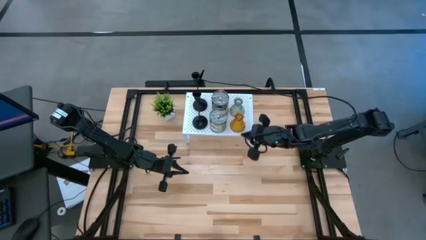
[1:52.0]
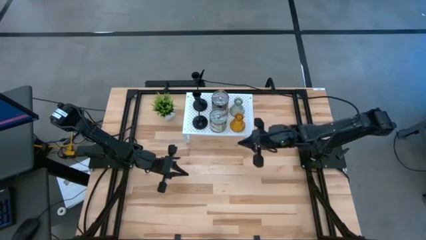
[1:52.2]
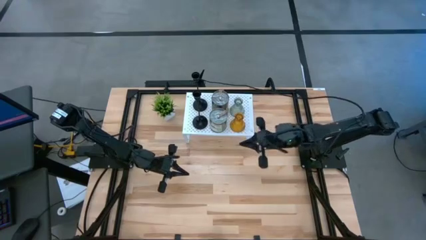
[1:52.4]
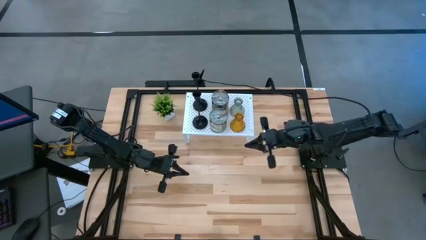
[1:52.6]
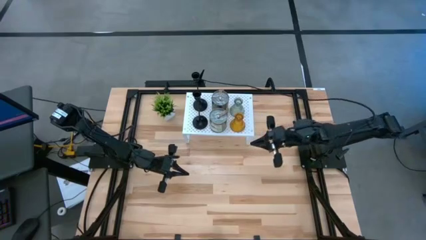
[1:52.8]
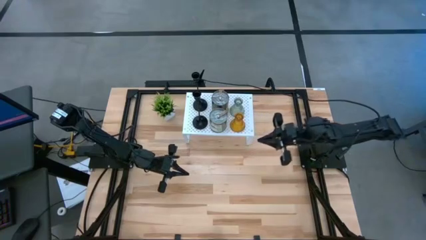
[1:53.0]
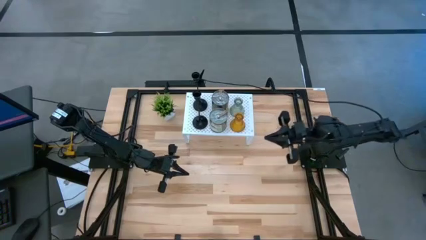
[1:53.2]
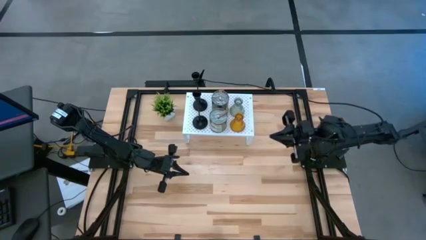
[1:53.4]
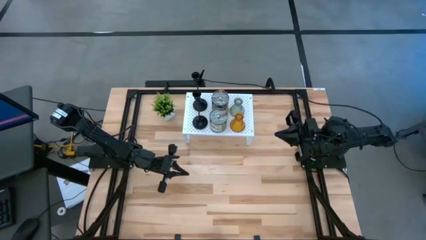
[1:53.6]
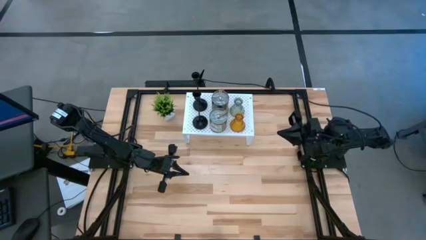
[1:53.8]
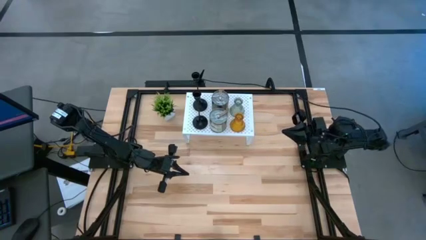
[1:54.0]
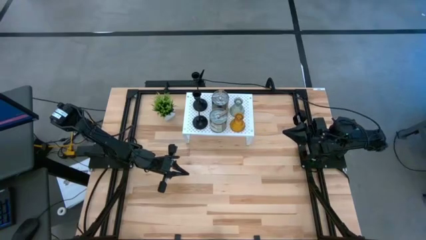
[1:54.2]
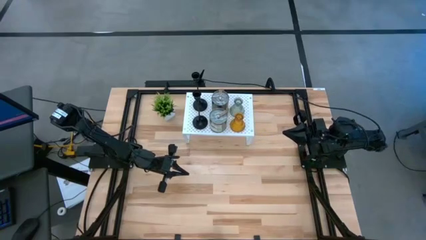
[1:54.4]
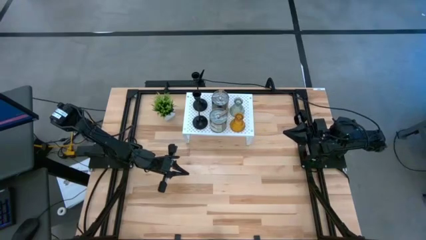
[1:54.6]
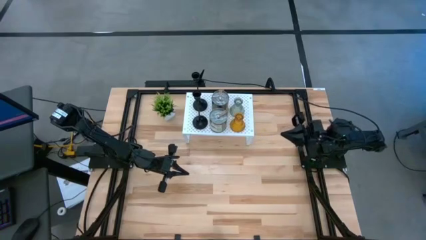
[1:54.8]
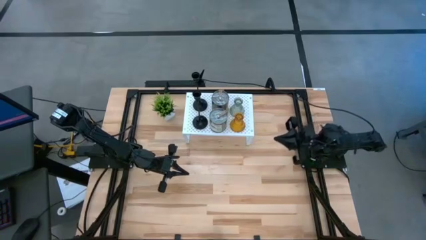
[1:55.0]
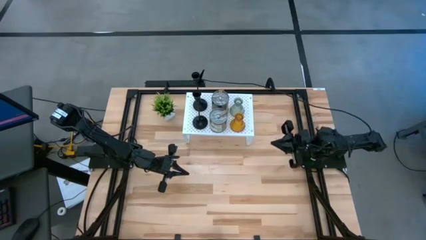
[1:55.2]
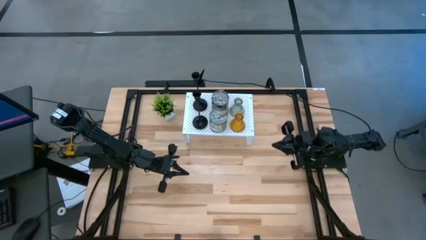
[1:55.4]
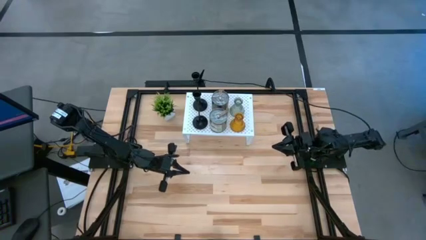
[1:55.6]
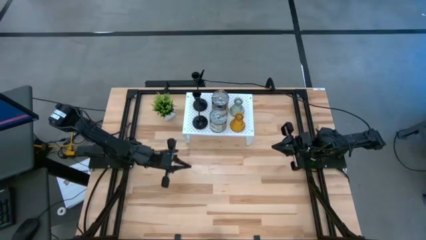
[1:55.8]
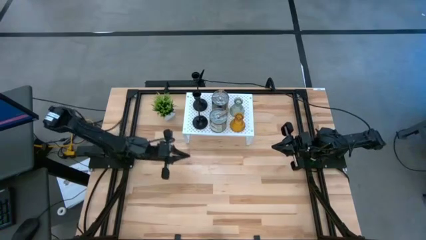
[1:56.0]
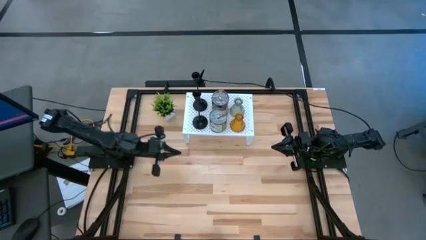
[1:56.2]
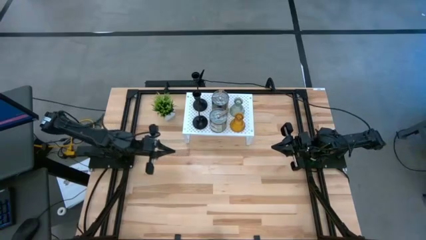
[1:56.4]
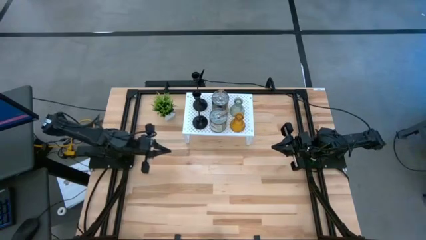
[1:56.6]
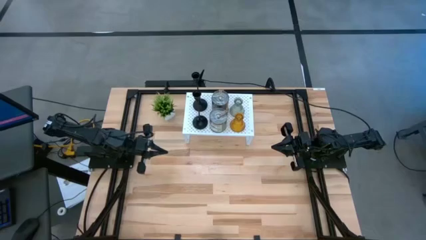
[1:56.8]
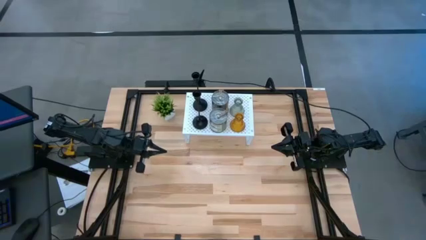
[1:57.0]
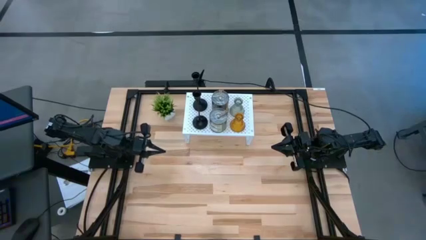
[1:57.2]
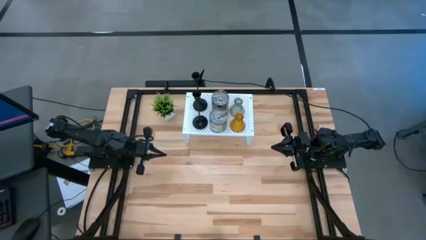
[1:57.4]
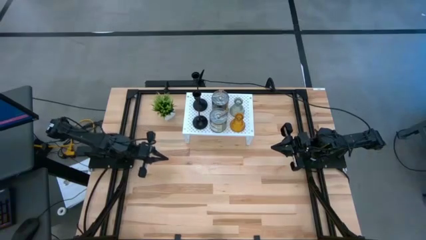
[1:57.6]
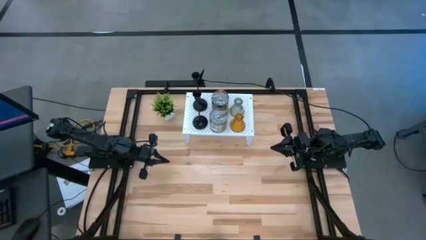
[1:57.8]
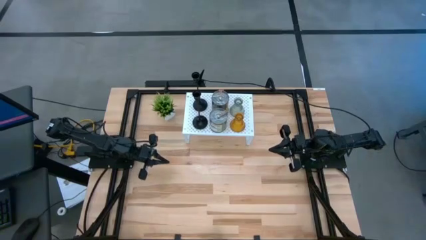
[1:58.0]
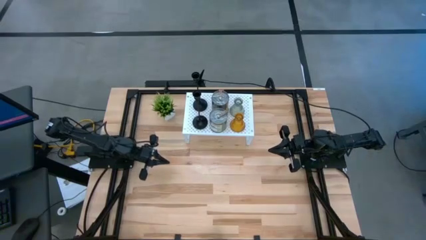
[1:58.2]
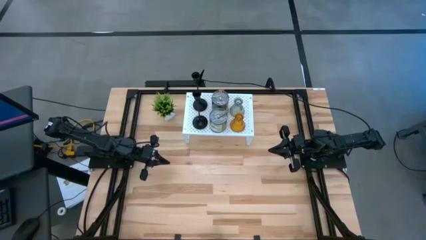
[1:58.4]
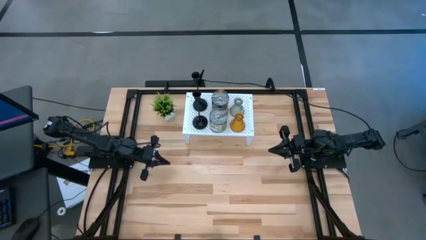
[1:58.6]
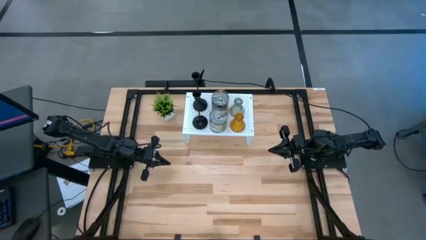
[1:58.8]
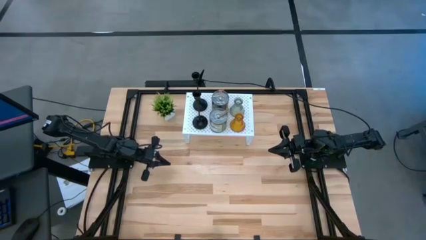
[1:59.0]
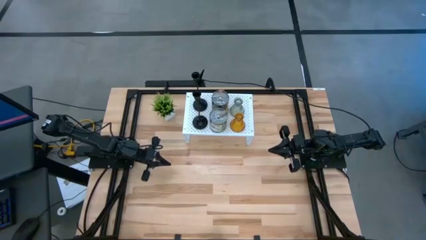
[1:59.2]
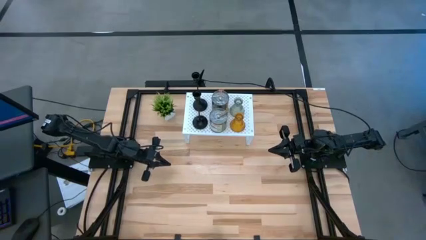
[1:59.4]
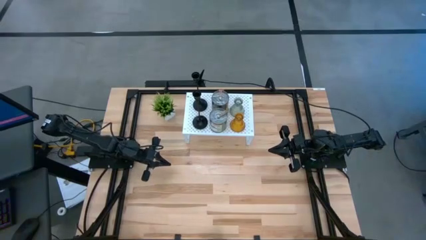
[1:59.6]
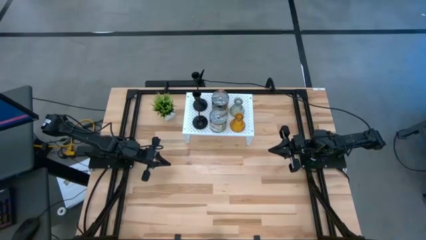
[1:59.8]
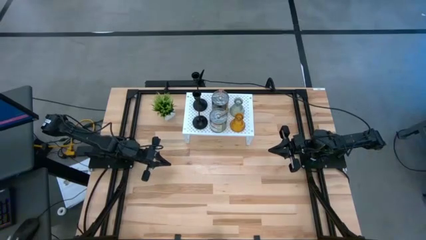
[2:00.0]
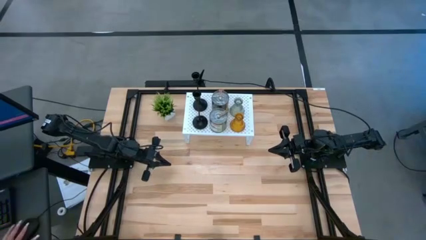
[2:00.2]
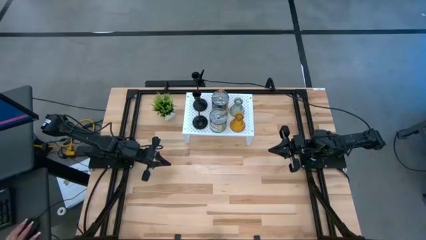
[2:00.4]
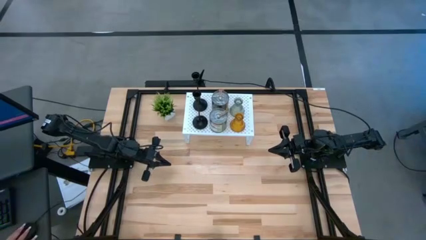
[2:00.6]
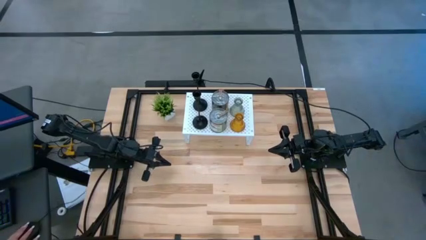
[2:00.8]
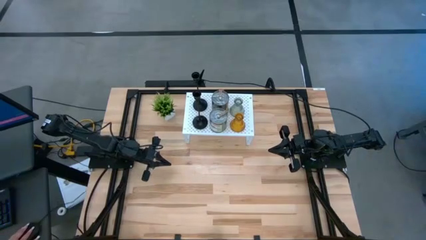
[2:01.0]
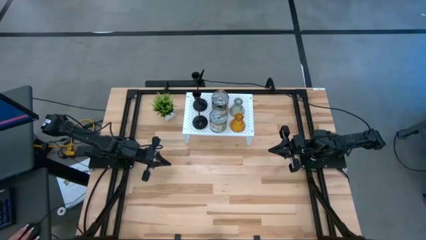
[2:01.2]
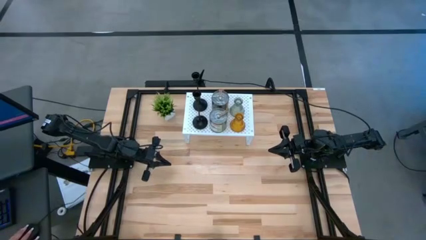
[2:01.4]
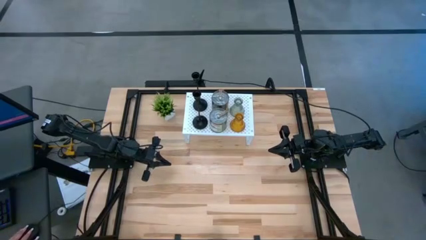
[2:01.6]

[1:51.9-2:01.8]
Task: Pick & Place candle stick holders
Return to Home Position

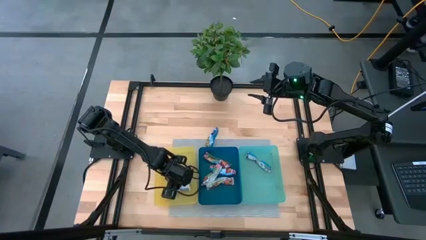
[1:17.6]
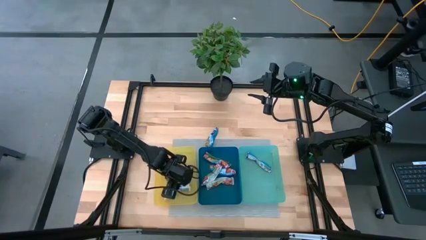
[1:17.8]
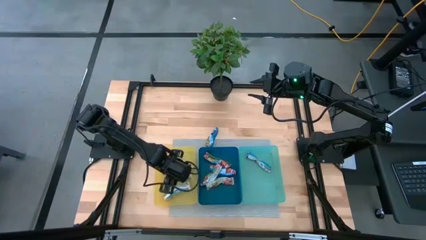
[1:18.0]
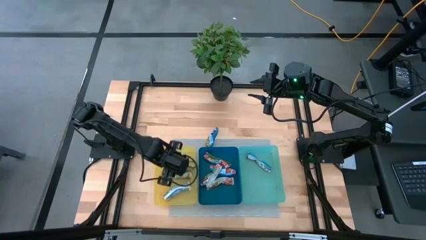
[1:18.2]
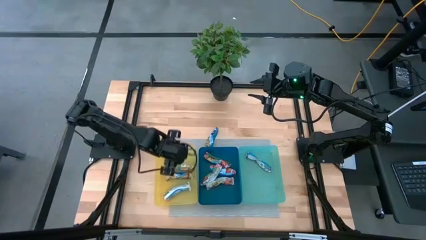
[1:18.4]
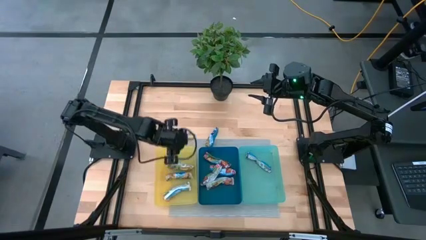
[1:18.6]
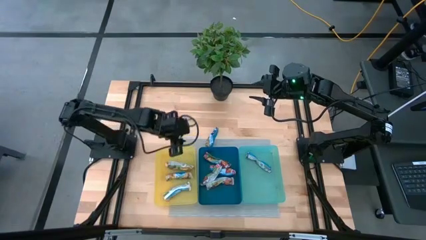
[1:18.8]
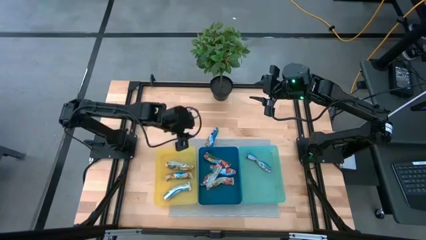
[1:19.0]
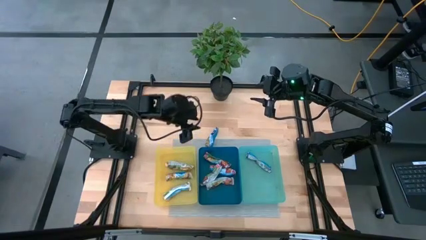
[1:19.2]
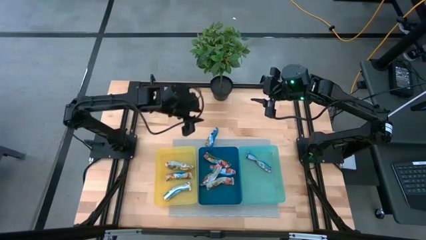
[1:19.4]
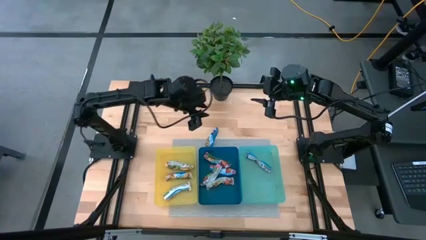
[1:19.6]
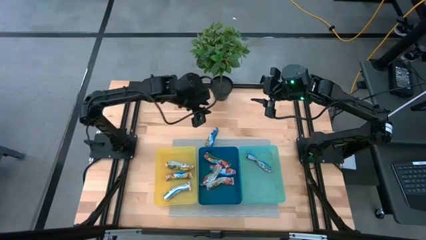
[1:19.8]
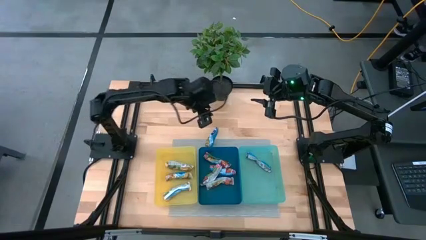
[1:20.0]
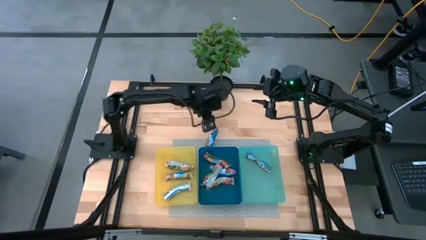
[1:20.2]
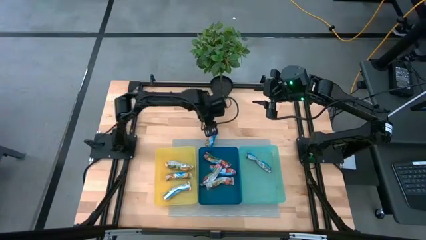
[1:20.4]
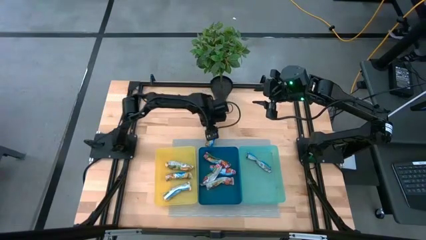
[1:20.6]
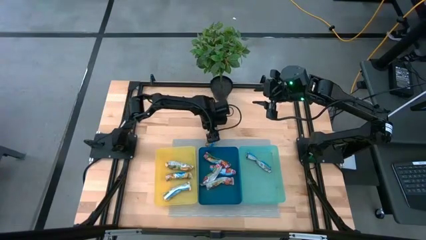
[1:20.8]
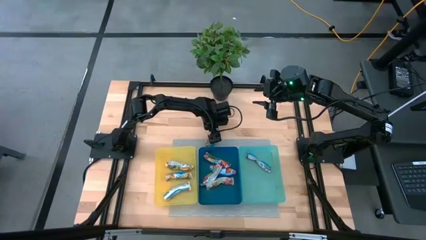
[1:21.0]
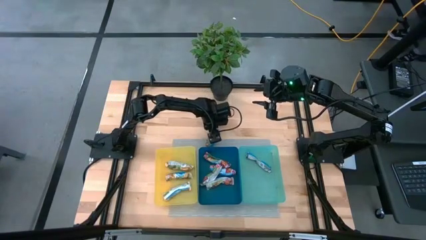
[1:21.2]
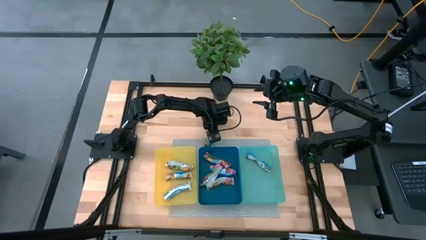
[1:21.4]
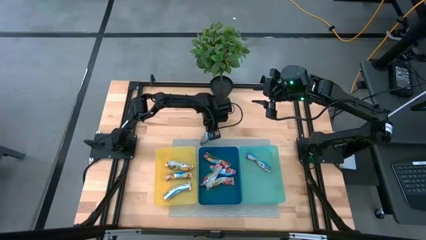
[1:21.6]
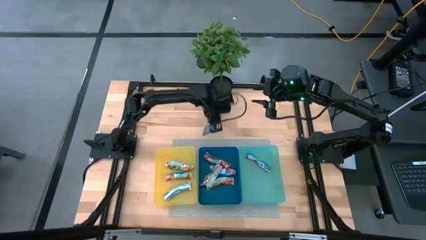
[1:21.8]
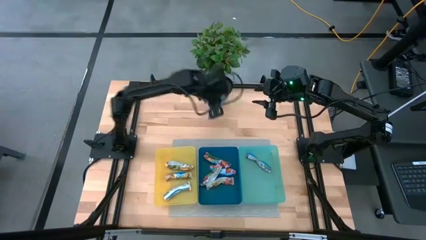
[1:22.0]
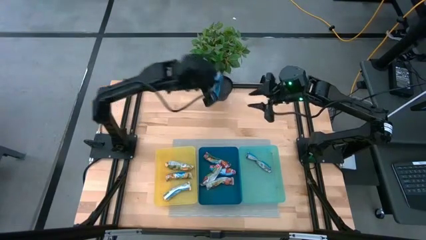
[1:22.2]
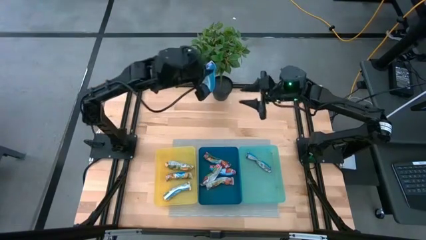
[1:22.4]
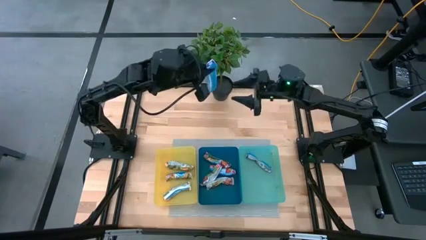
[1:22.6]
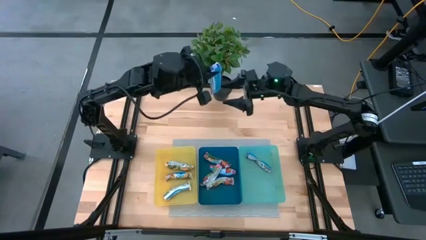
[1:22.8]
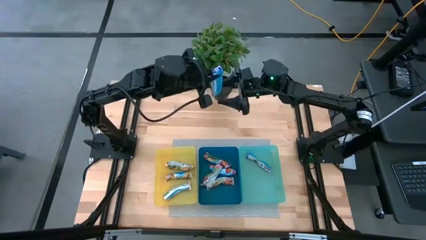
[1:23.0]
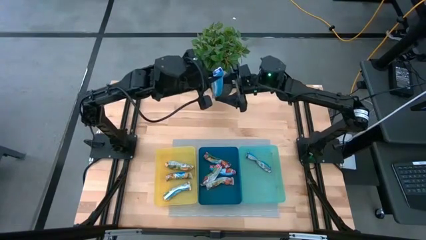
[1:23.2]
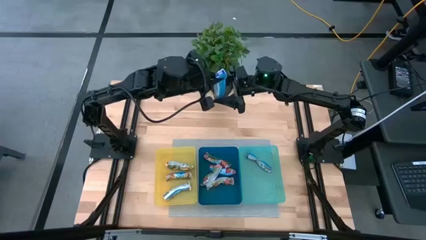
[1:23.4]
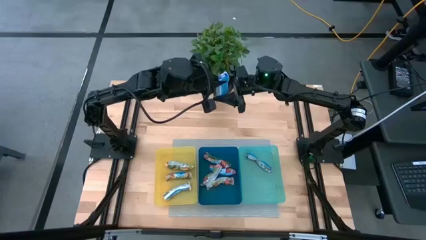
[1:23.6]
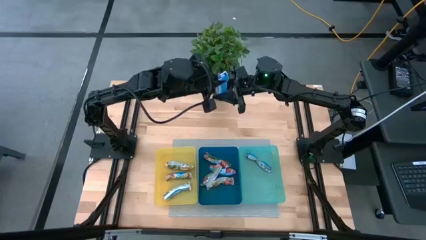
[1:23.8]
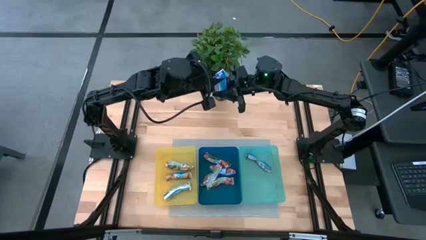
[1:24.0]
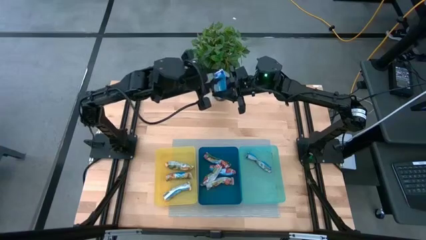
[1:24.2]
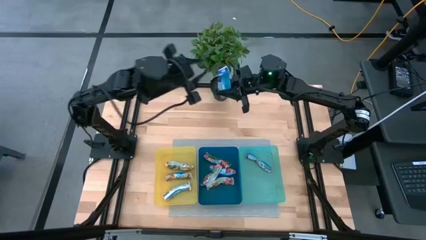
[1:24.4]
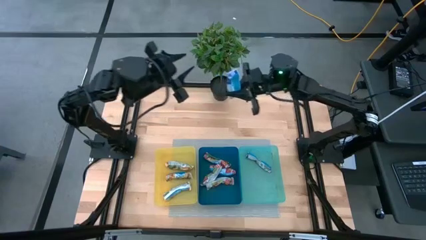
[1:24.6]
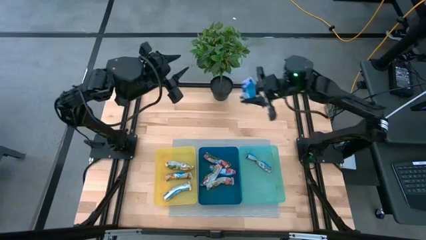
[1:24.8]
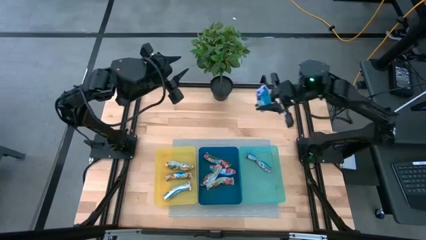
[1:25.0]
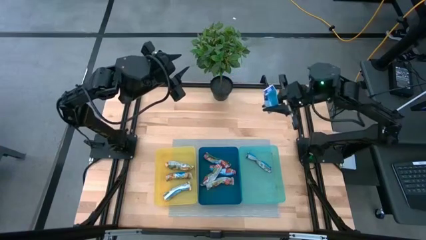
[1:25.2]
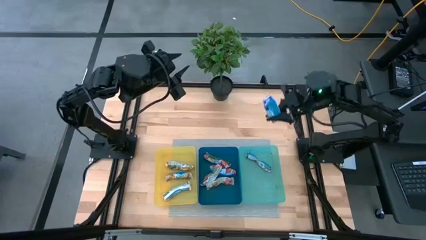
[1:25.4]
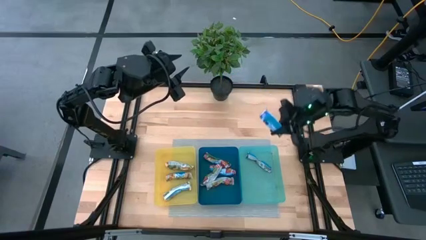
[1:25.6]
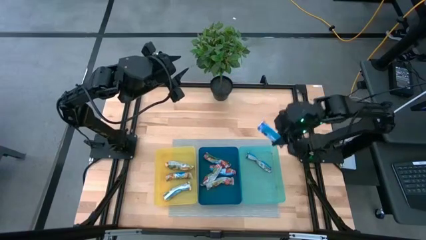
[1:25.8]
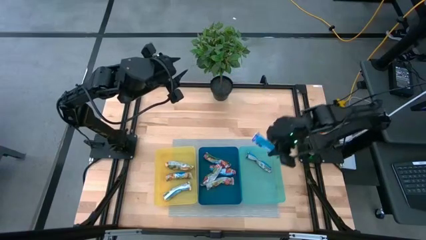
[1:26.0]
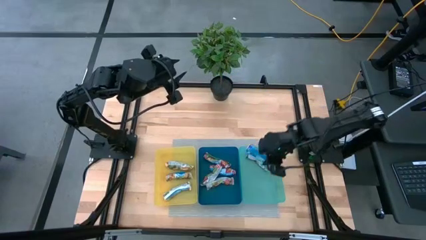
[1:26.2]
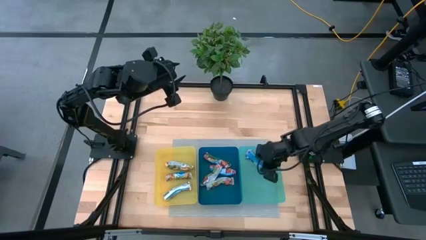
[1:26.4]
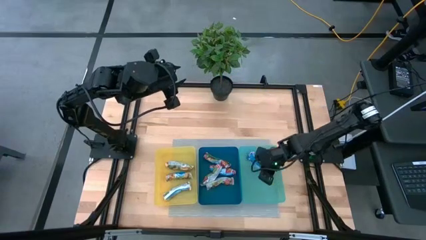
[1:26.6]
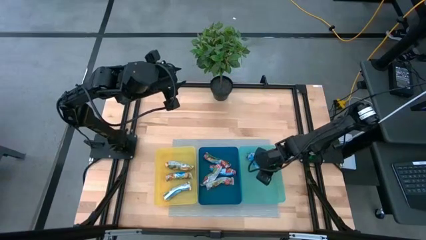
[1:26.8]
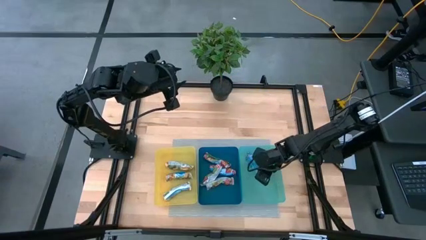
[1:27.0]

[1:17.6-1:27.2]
Task: Pick and place Granola Bars by type
Put the blue granola bar into the light blue bin
